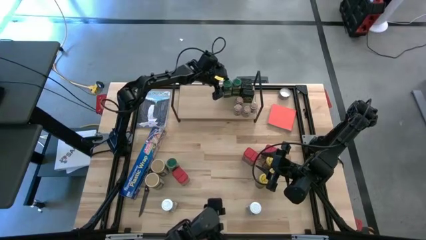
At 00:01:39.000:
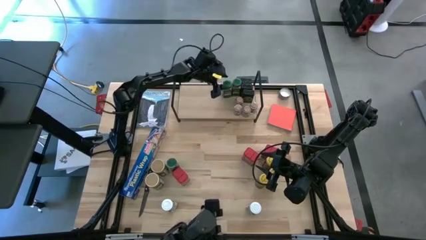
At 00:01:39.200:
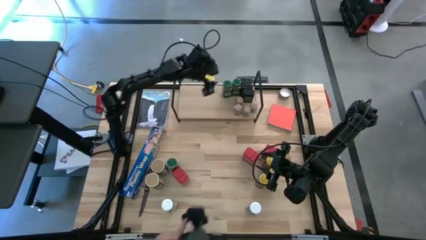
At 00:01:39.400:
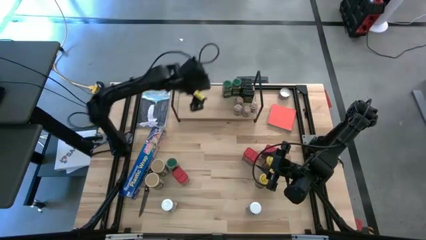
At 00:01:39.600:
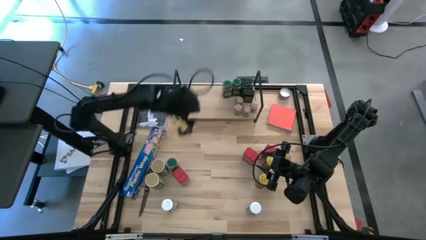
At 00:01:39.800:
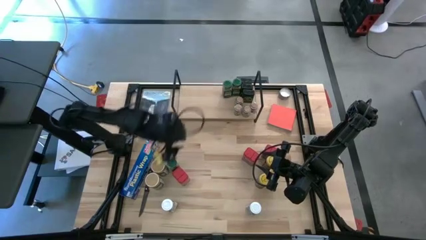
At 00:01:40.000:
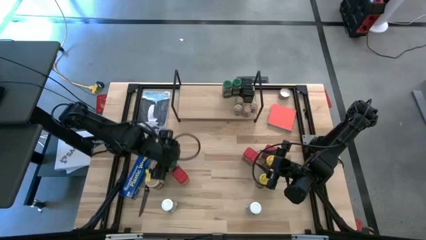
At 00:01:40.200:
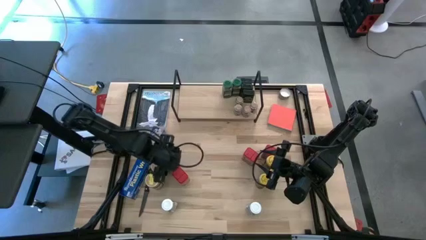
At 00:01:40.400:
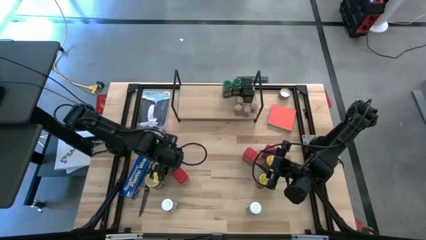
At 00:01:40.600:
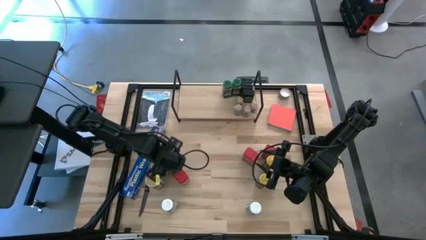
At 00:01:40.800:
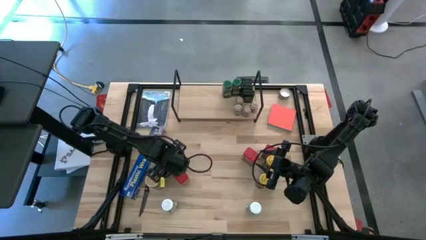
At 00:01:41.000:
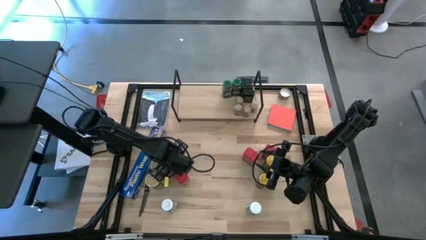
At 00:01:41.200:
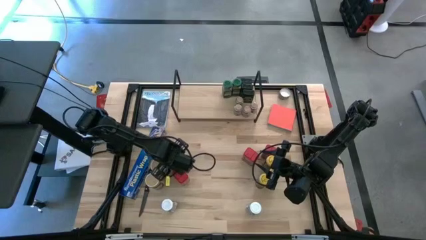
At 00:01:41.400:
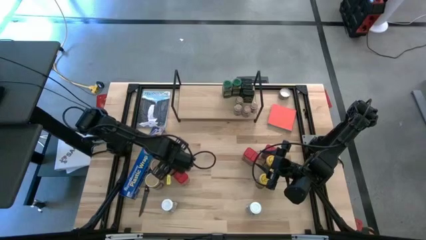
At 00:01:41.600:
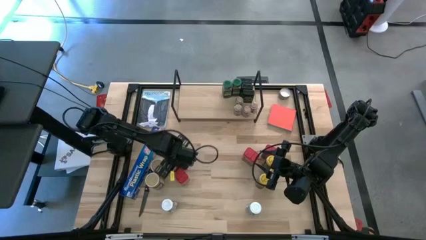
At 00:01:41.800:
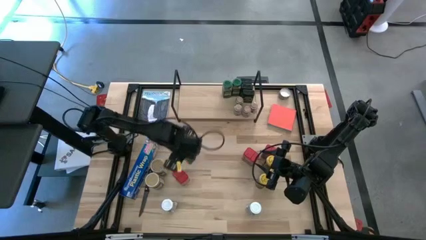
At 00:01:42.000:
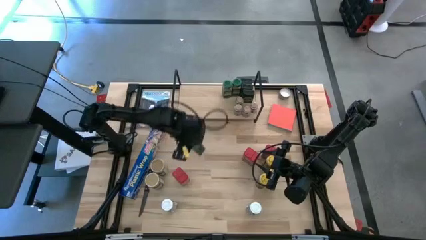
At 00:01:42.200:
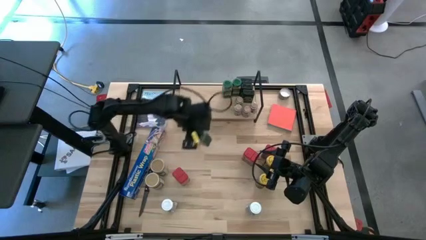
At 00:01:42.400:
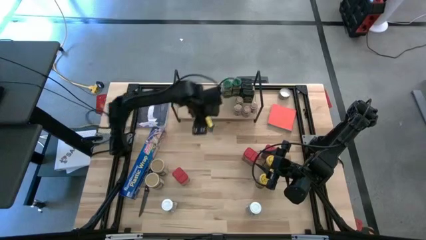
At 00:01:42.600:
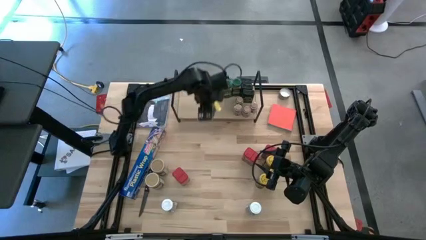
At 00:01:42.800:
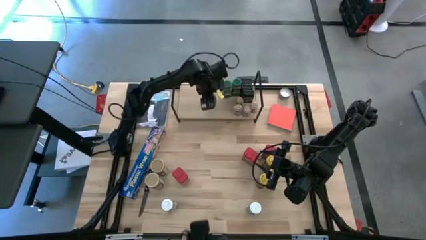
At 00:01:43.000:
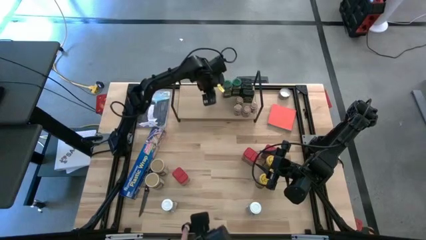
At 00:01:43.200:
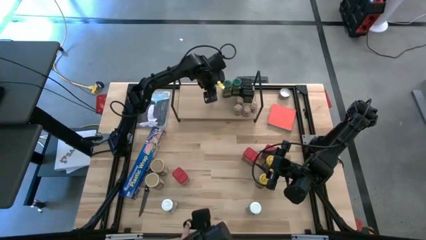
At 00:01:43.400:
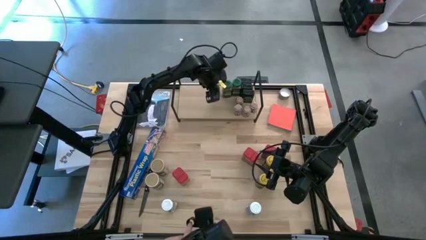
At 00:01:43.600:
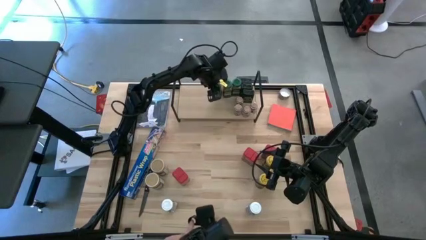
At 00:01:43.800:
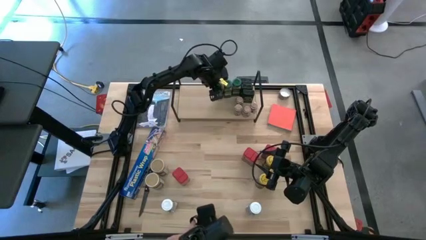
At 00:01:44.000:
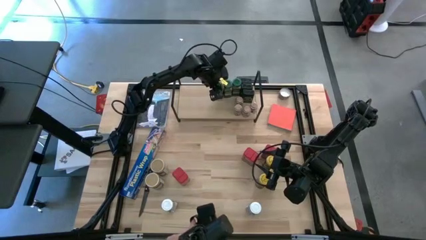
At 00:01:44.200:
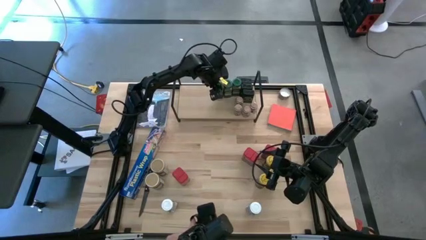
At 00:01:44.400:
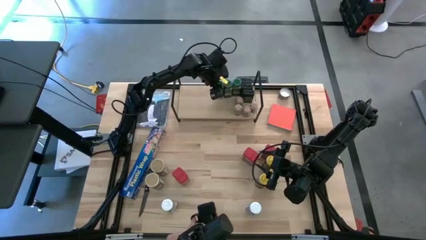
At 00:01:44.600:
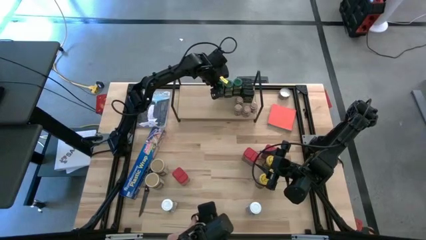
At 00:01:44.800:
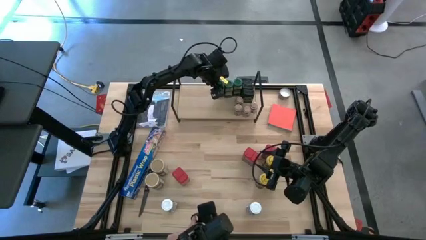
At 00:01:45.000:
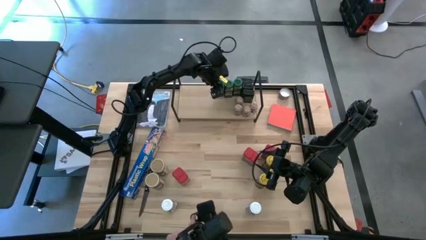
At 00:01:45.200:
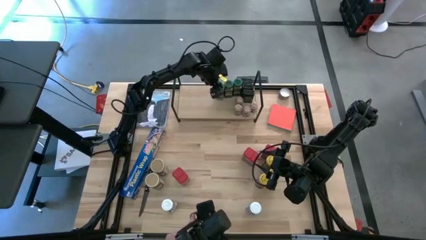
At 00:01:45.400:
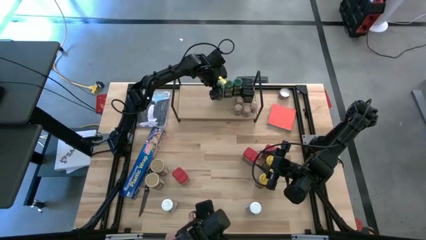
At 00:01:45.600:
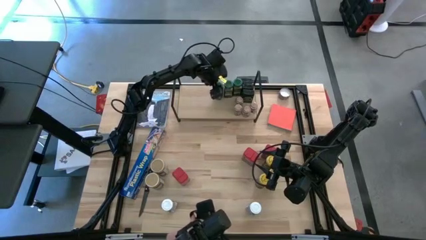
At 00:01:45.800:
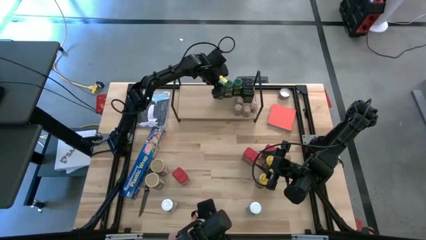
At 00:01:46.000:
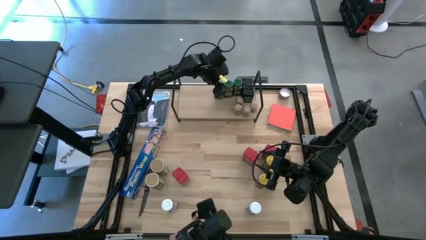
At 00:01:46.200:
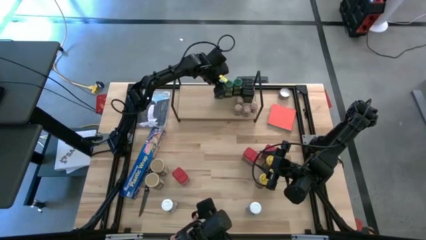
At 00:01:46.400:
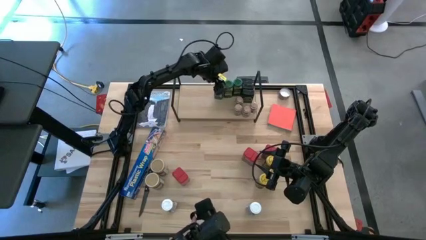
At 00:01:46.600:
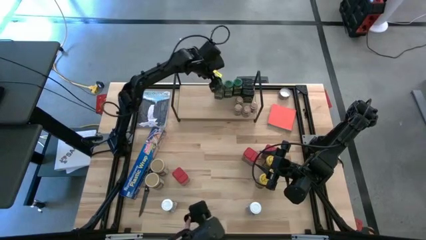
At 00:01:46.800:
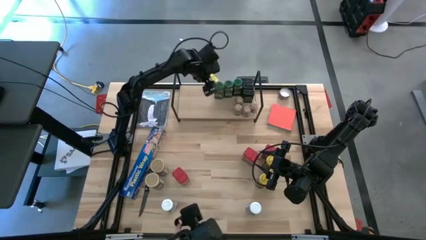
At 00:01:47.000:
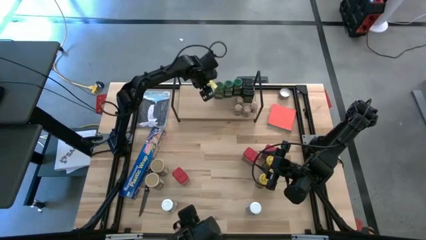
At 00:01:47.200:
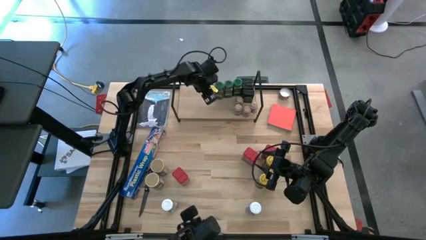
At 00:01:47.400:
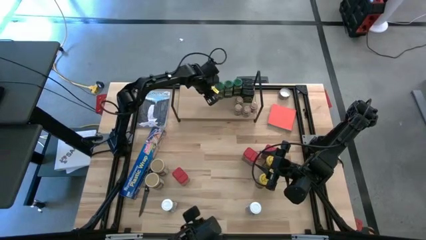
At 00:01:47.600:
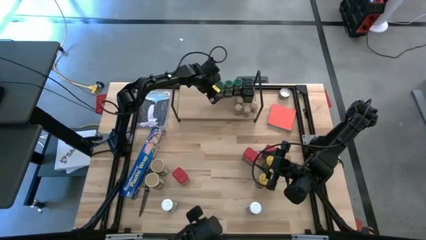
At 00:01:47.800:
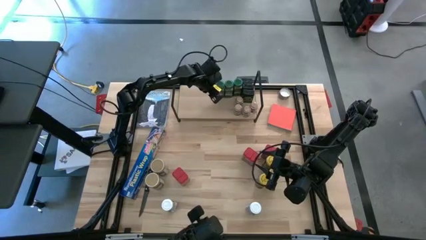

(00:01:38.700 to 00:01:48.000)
Task: Shelf spices
Put the green seasoning bottle on the shelf aligned to the left of the green seasoning can

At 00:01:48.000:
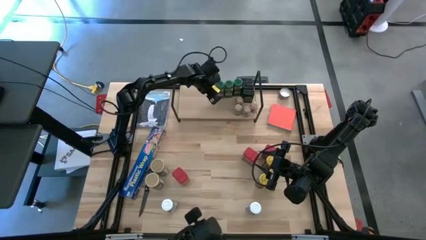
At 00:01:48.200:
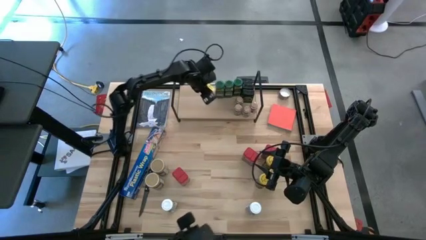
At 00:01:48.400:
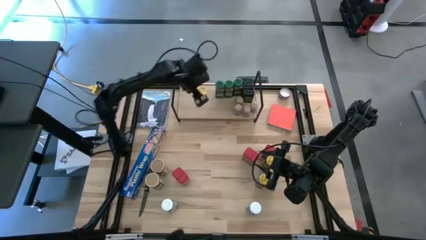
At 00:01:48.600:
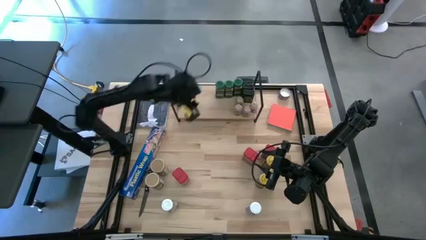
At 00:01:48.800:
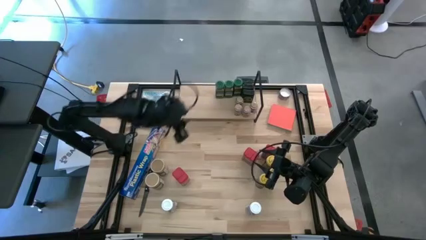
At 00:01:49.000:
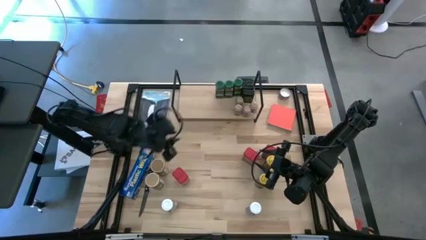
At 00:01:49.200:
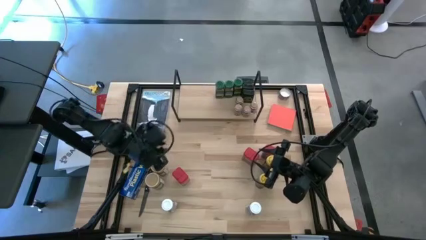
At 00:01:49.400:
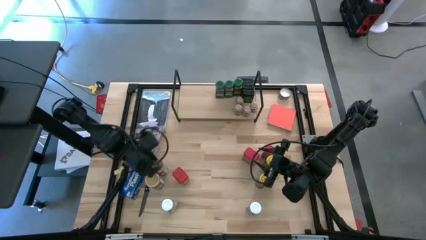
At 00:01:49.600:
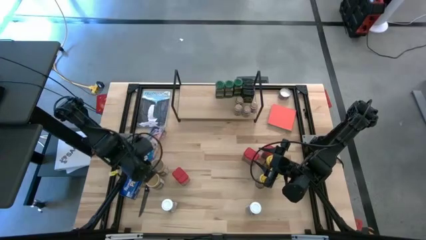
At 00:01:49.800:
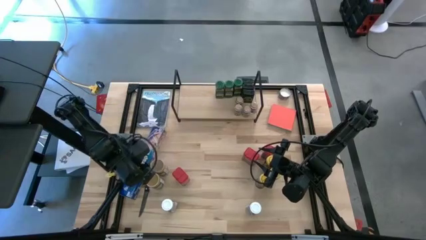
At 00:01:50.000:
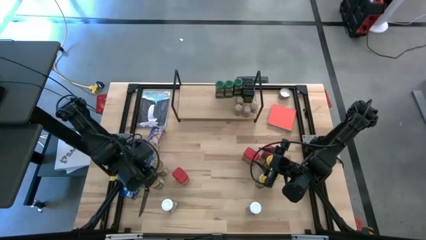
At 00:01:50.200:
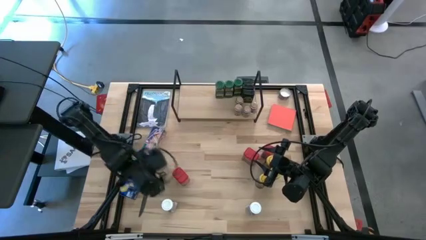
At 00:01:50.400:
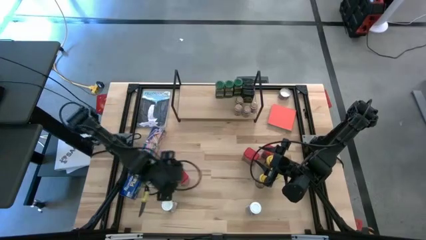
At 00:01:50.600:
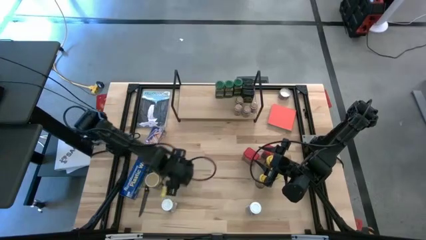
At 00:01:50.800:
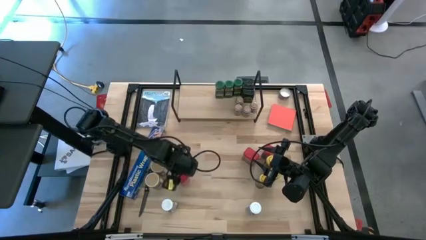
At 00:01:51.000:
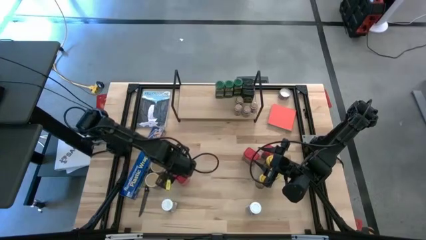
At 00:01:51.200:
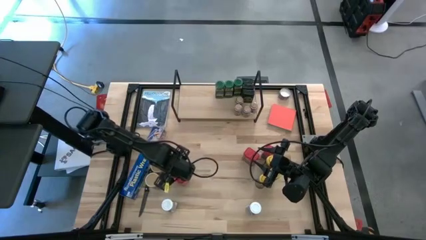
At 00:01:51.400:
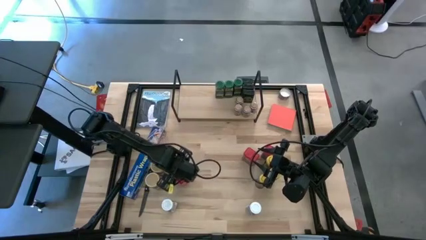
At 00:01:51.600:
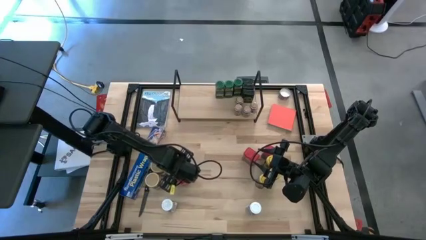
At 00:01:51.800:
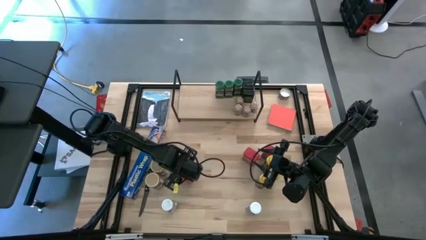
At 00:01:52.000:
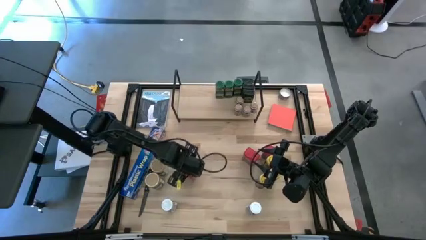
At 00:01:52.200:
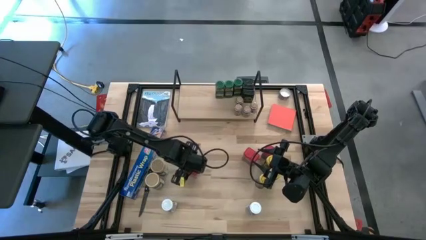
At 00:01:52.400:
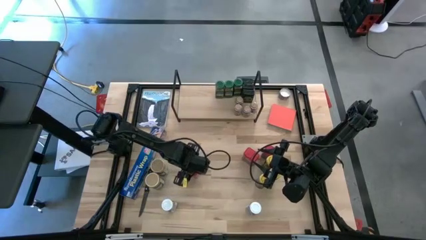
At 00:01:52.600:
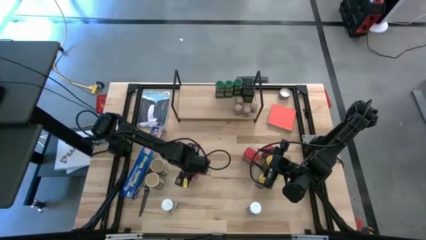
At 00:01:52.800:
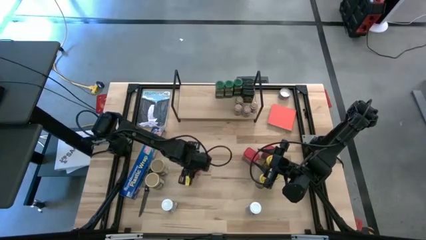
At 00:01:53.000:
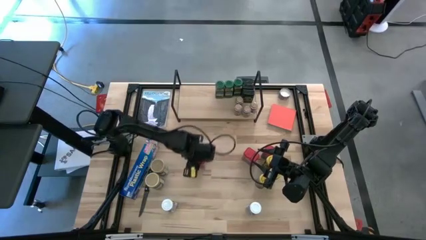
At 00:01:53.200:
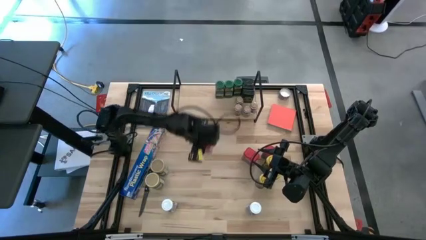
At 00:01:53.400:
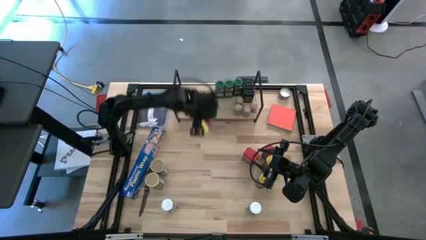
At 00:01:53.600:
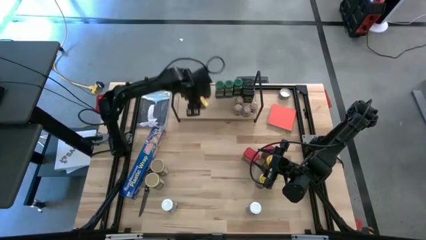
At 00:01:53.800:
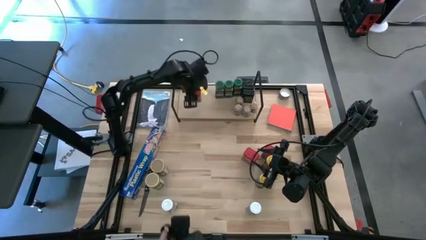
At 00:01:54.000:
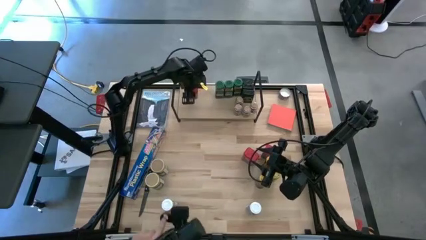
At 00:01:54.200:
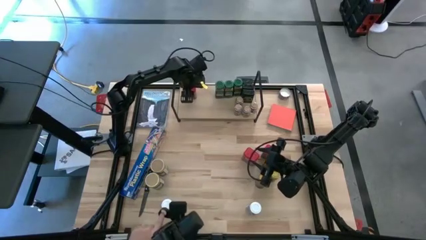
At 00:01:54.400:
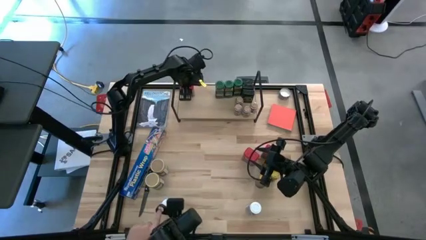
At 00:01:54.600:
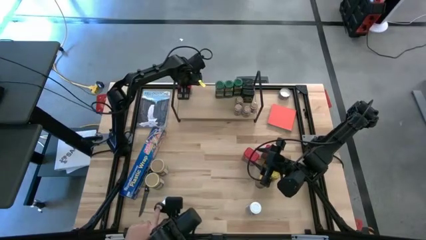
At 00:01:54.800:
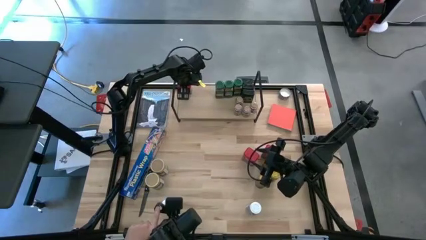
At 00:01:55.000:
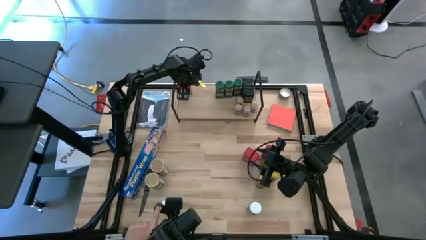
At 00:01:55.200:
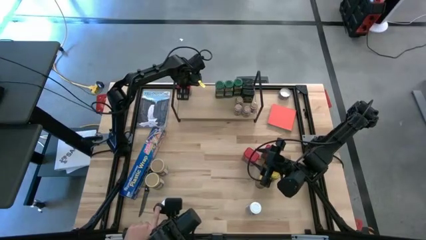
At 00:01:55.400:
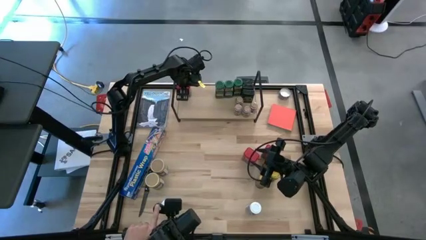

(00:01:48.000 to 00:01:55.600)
Put the red seasoning can on the shelf
